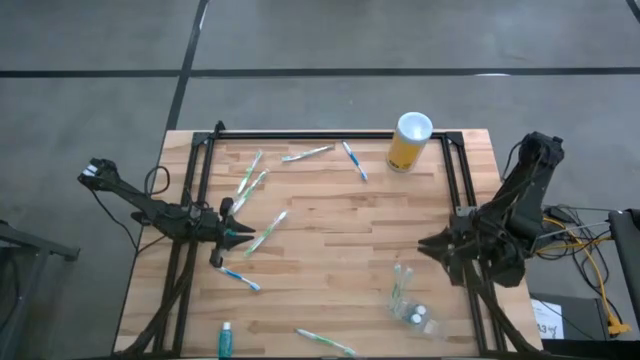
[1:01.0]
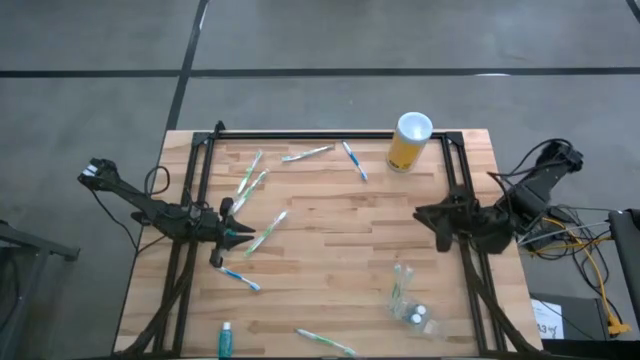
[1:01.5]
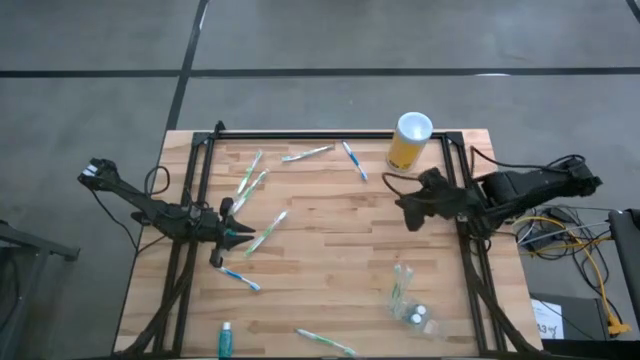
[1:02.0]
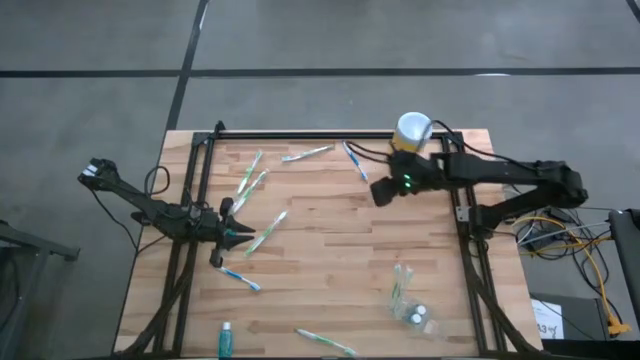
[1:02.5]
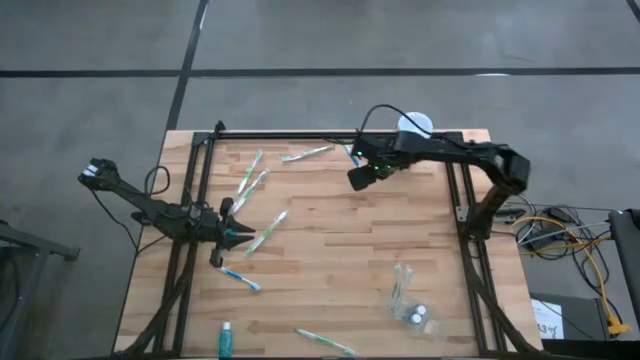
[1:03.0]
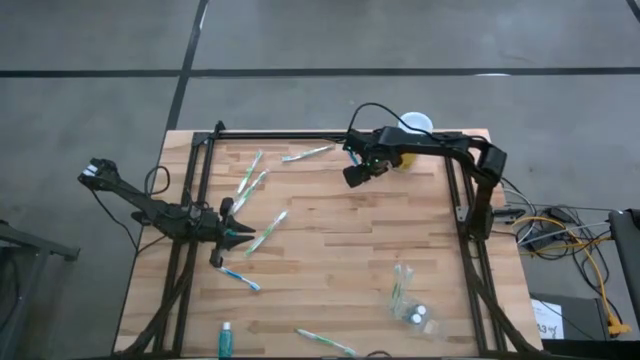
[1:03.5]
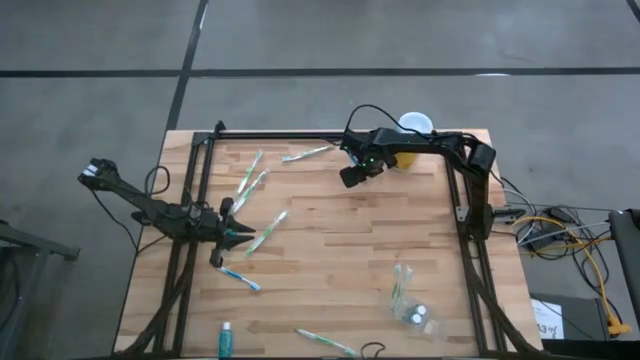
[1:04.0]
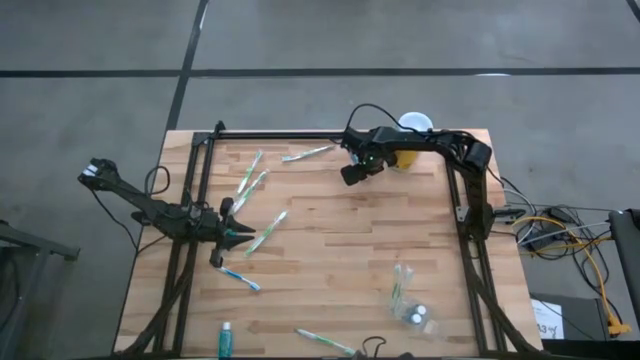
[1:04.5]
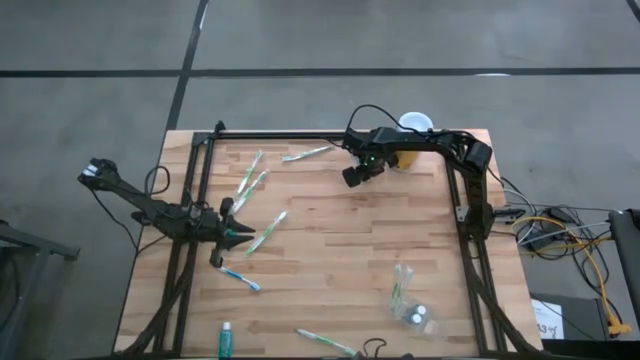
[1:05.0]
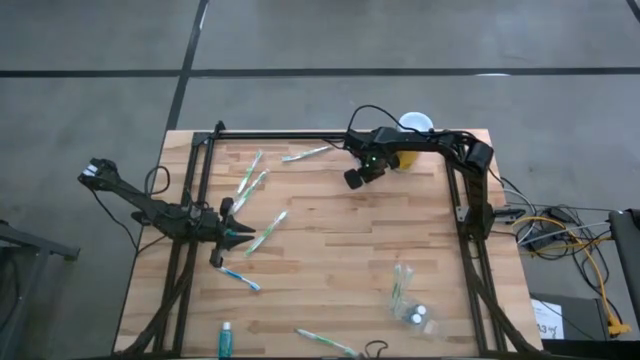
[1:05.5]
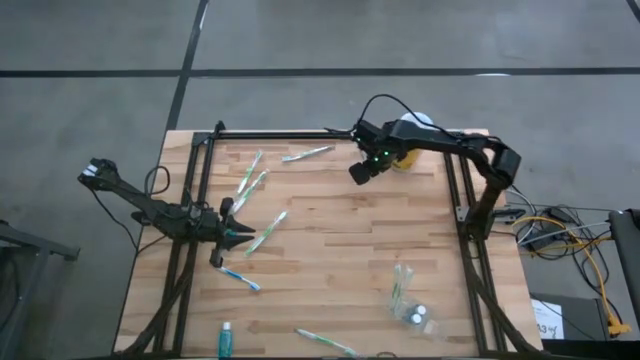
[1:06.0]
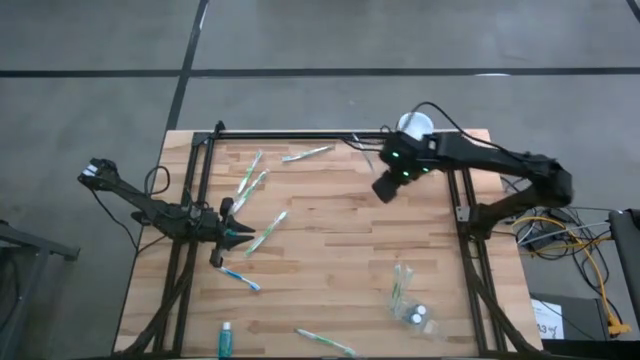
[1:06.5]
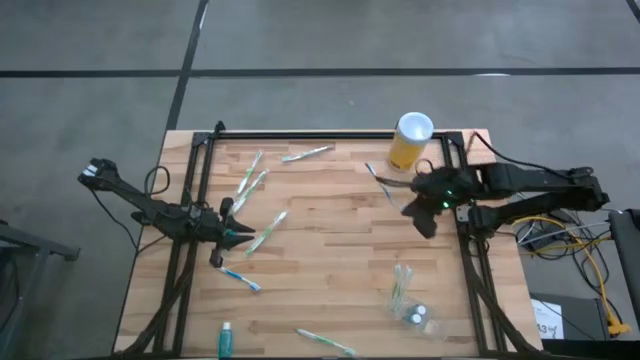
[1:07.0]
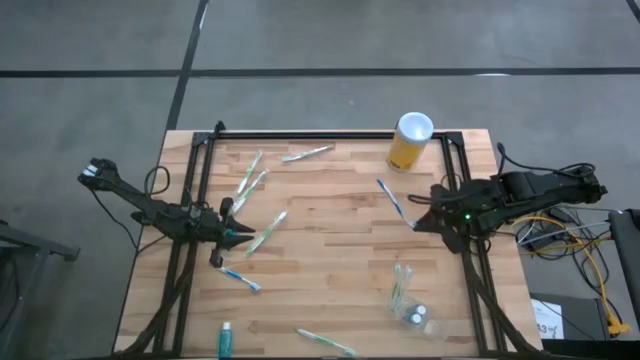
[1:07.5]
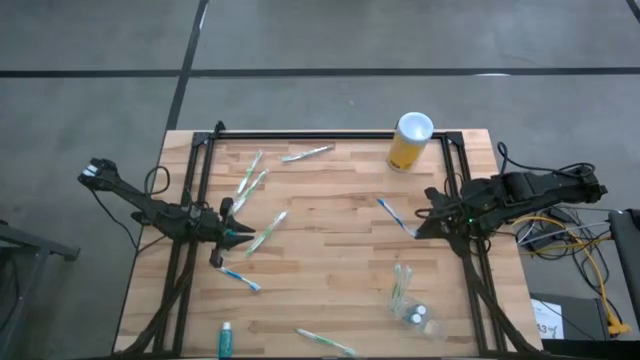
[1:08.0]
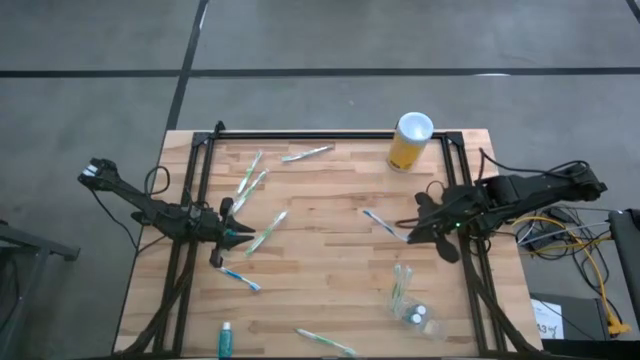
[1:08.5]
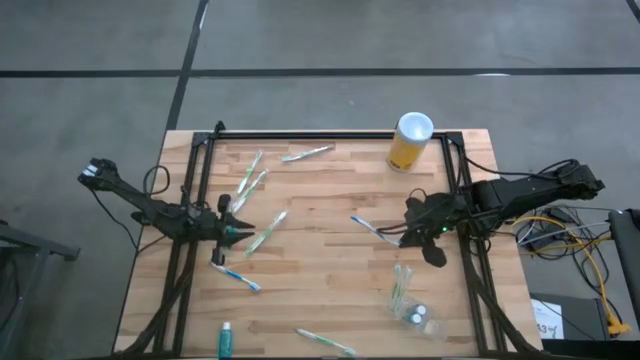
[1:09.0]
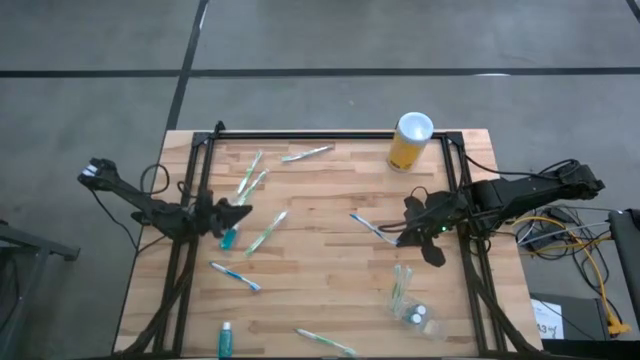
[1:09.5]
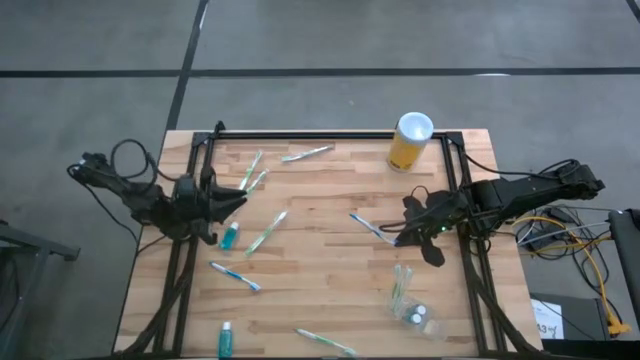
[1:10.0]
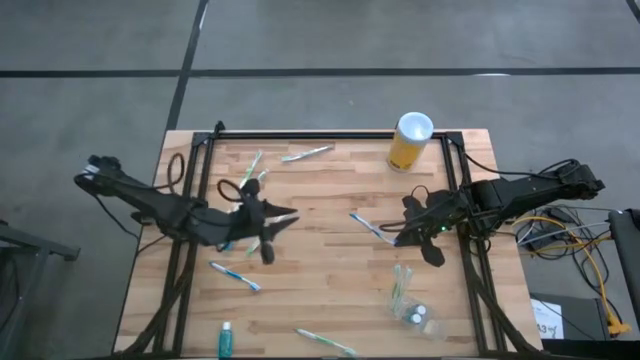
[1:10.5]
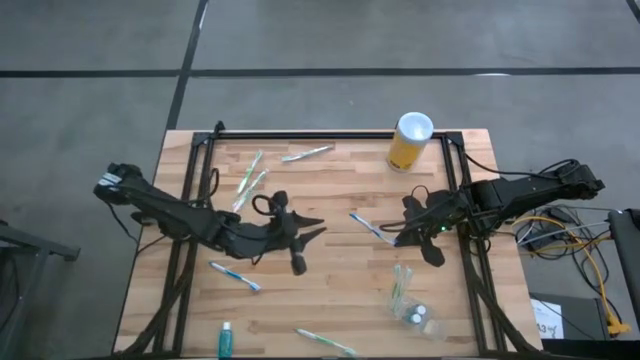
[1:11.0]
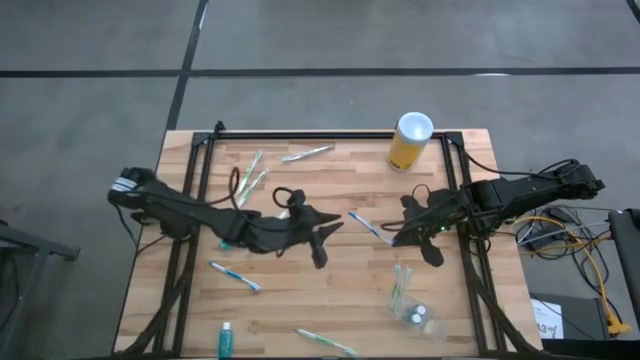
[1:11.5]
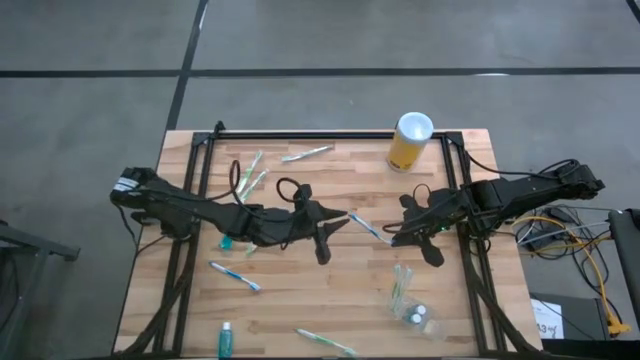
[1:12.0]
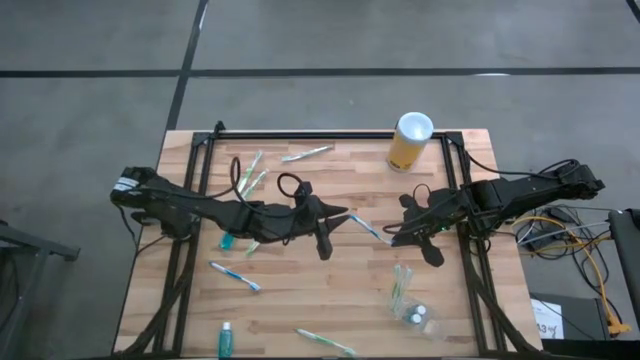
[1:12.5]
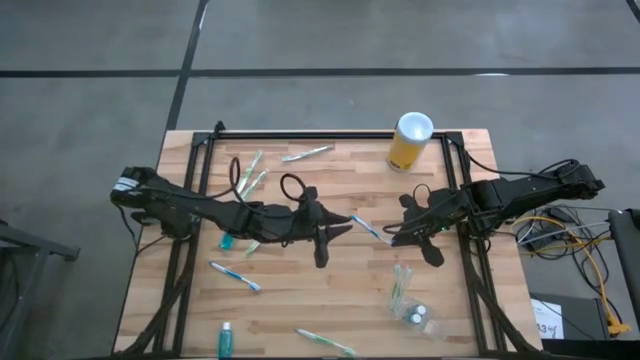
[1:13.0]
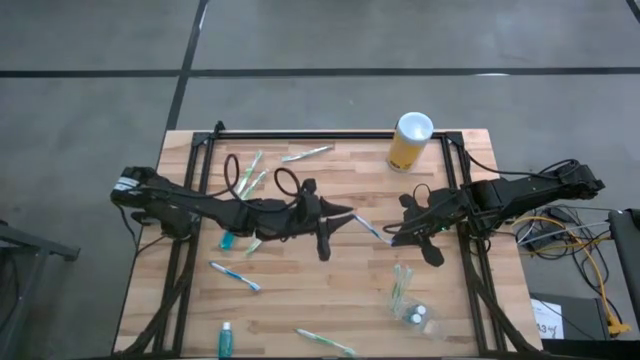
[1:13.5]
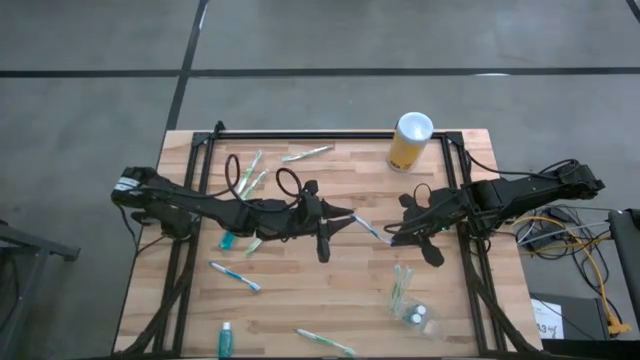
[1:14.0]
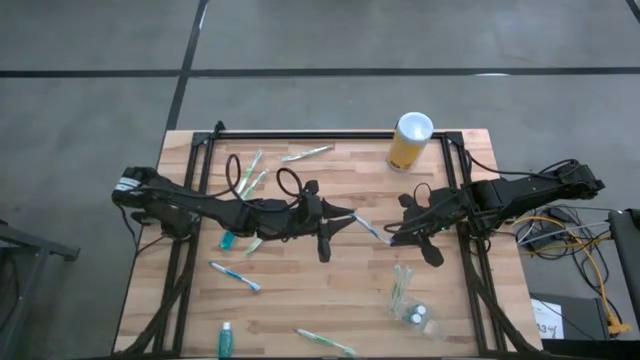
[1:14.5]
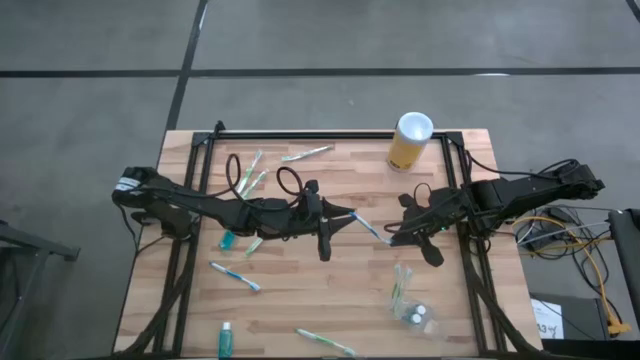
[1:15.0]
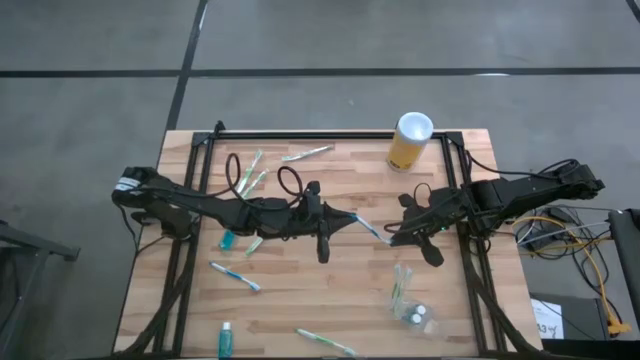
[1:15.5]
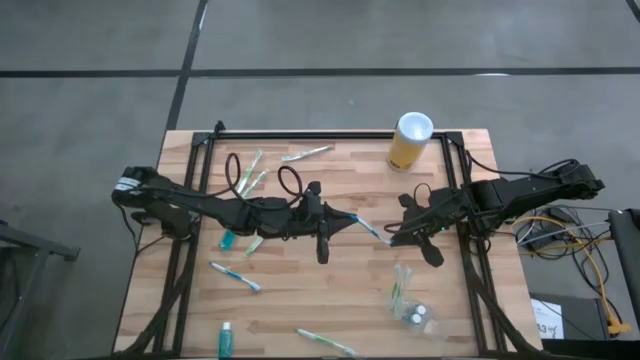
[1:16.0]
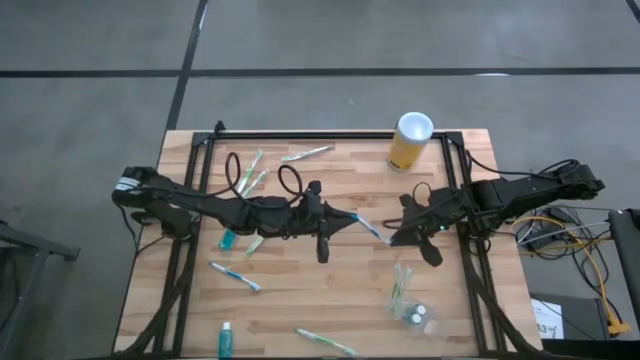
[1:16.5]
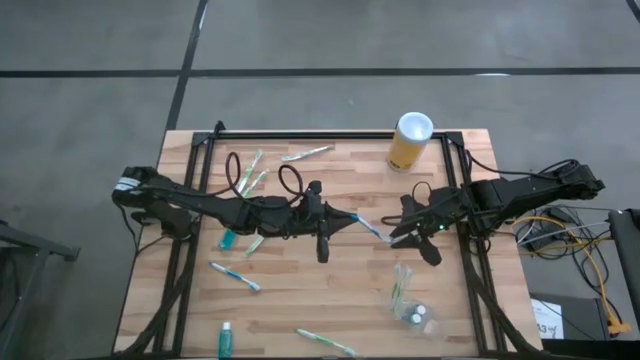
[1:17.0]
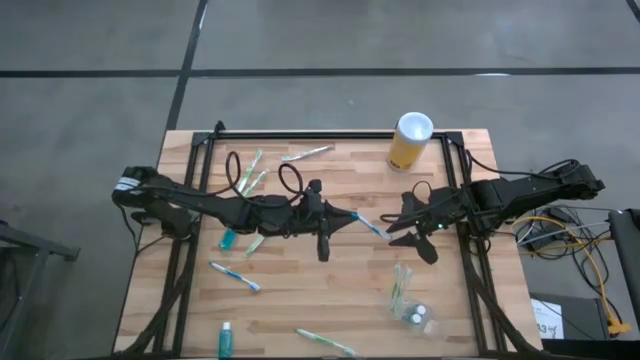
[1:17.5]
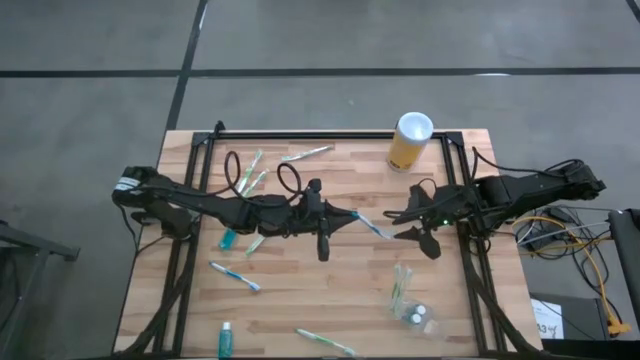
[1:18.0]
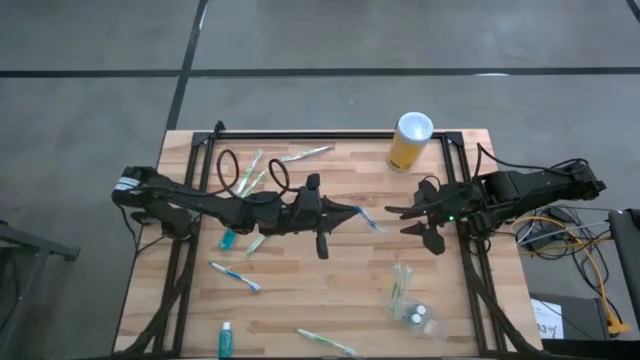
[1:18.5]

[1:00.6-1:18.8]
Task: Pick & Place toothbrushing station
Put the top blue toothbrush into the transparent organizer

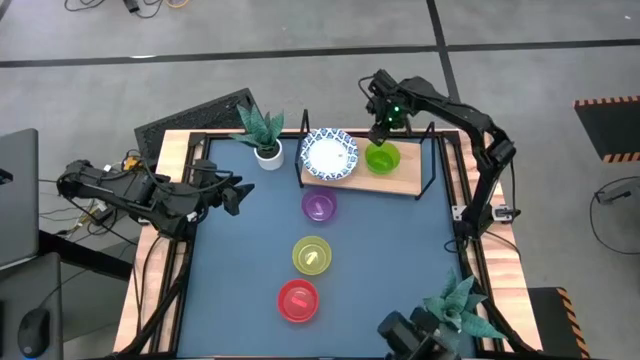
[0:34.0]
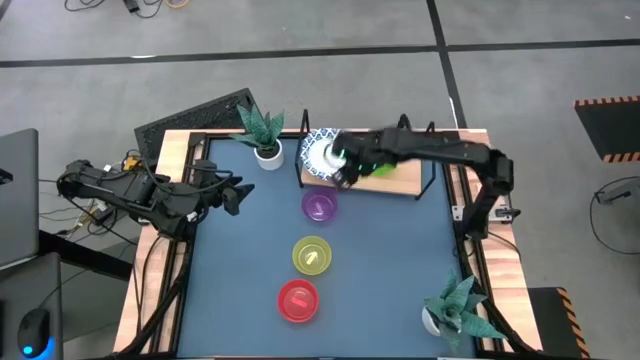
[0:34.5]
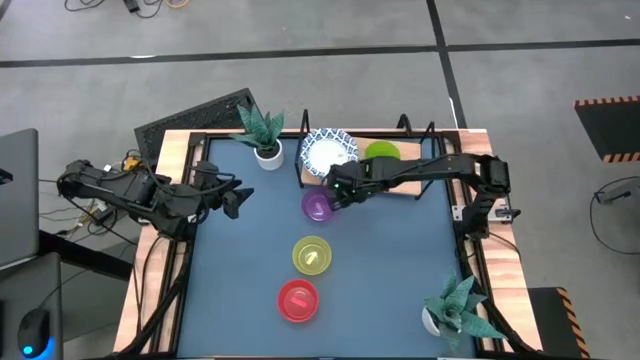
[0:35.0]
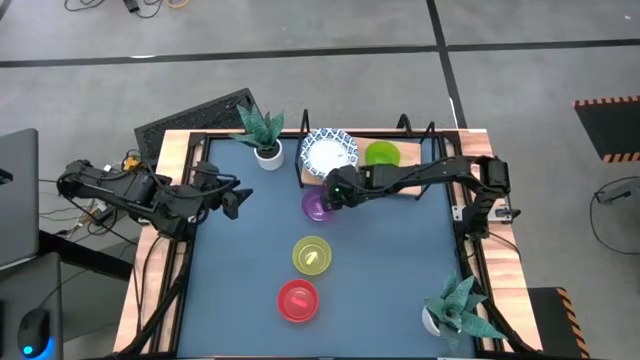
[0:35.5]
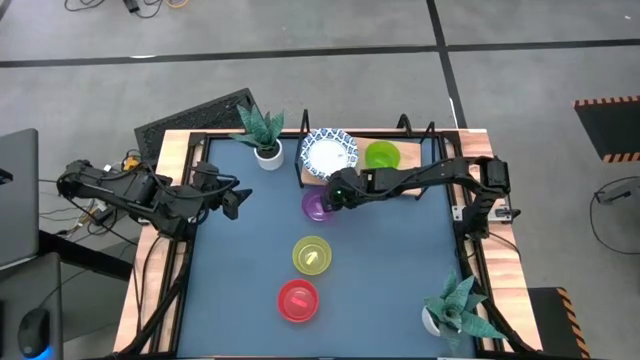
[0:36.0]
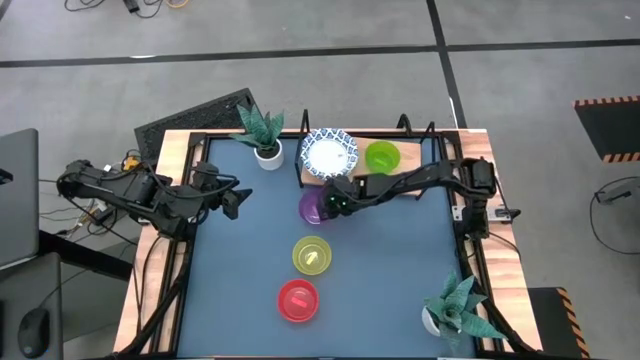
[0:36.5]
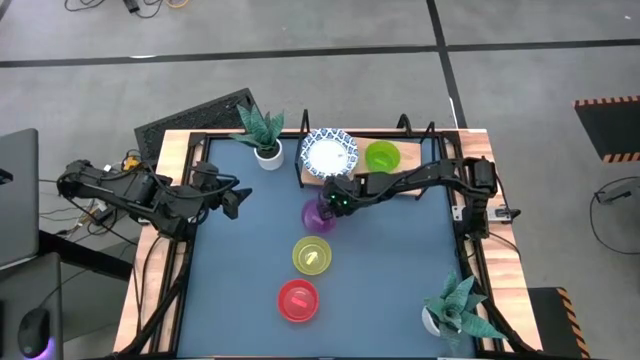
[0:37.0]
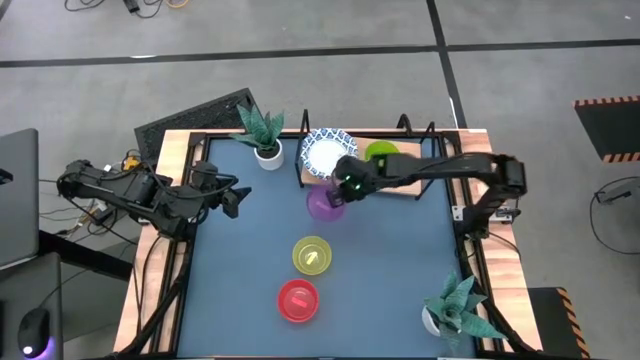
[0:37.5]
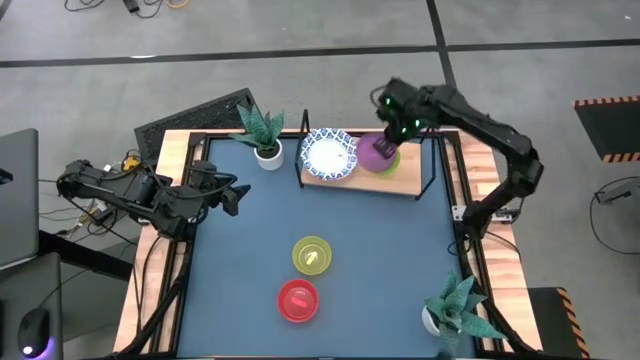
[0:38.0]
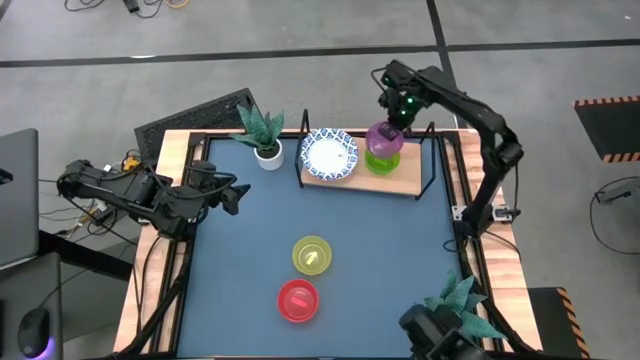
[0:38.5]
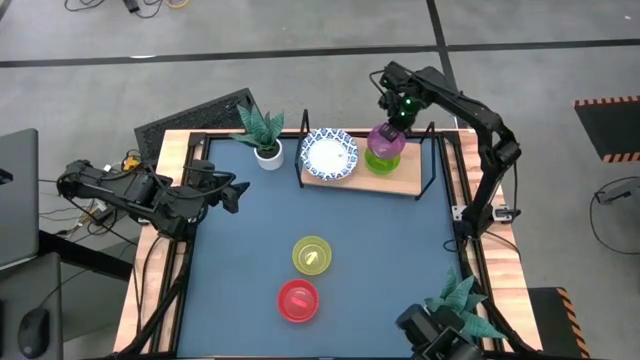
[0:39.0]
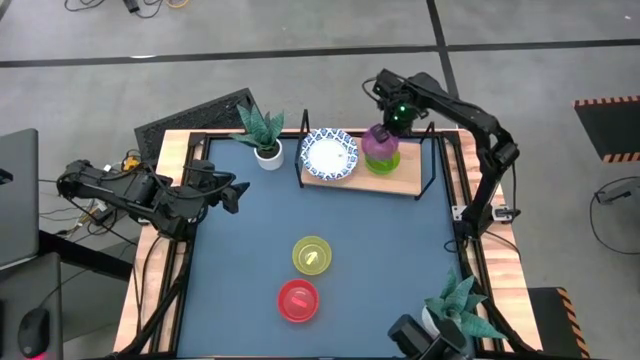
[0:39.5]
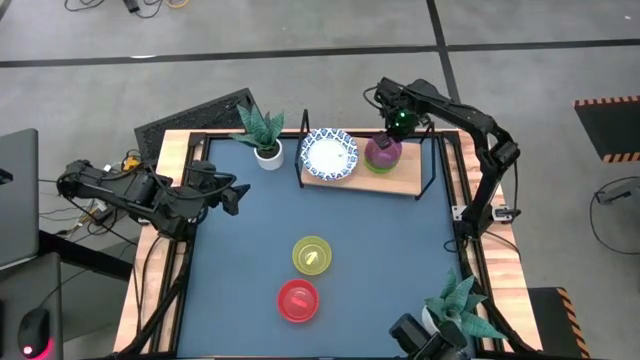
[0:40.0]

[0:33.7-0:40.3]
Task: Place and stack bowls onto a shelf
Stack the purple bowl on top of the green bowl on the shelf
